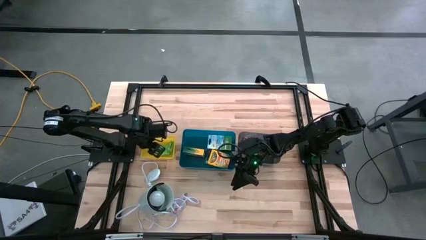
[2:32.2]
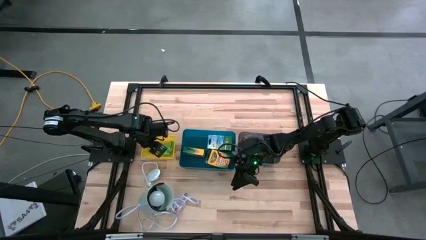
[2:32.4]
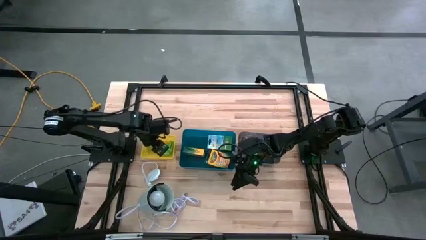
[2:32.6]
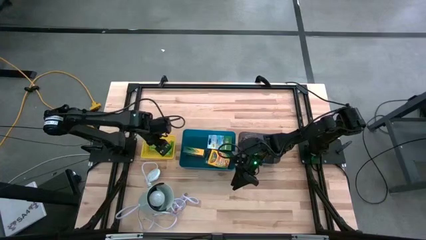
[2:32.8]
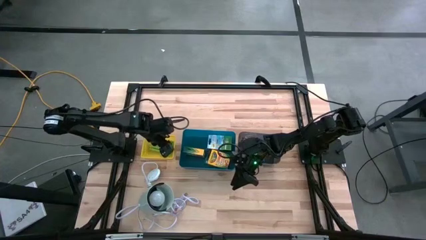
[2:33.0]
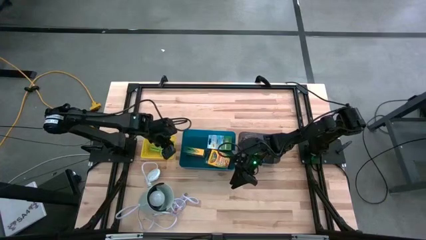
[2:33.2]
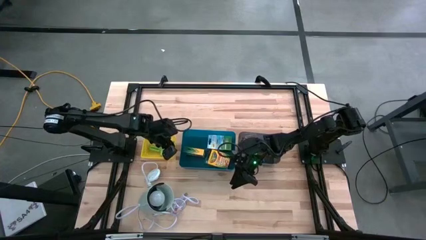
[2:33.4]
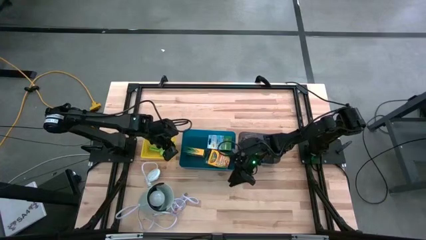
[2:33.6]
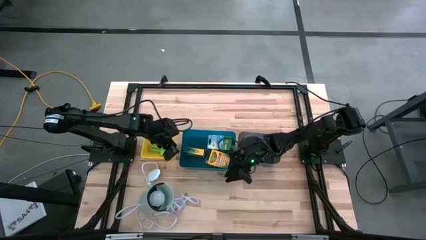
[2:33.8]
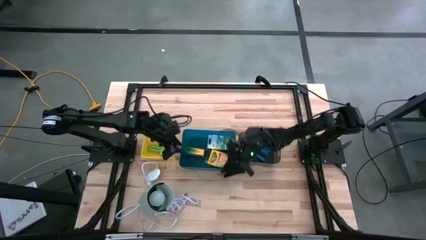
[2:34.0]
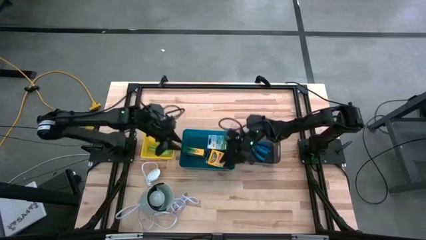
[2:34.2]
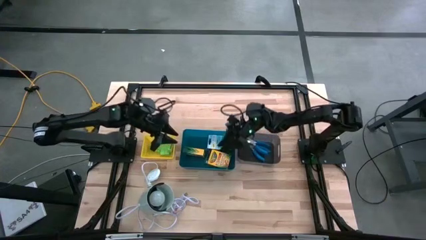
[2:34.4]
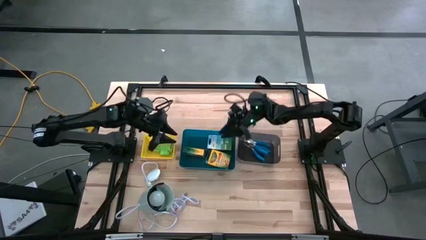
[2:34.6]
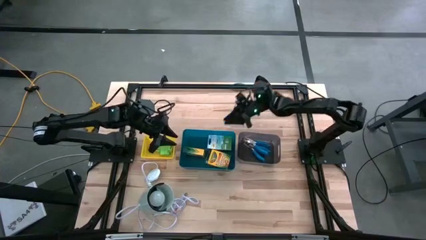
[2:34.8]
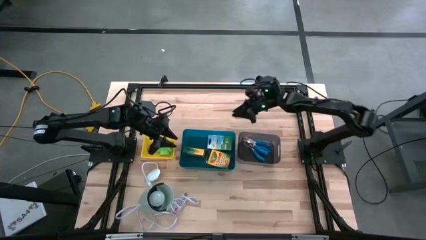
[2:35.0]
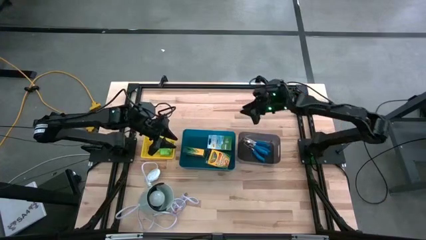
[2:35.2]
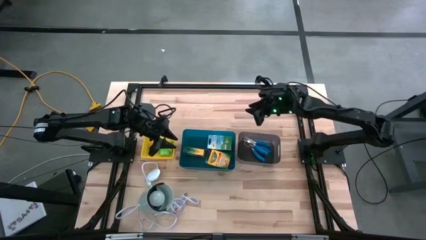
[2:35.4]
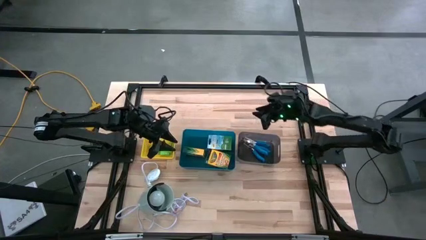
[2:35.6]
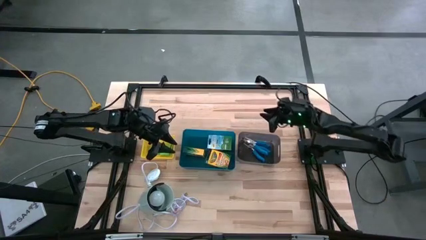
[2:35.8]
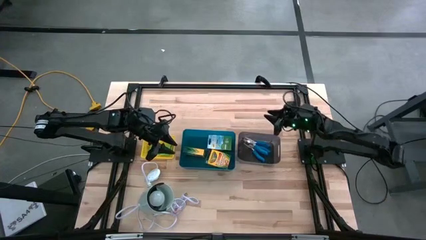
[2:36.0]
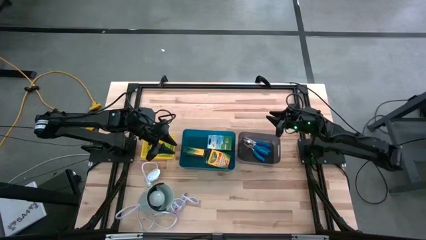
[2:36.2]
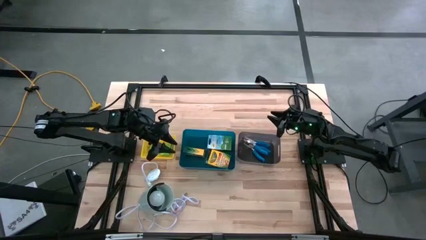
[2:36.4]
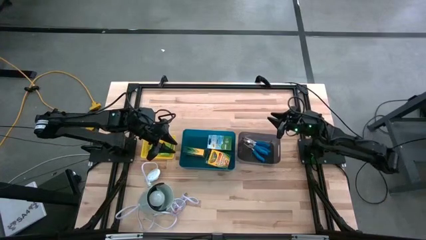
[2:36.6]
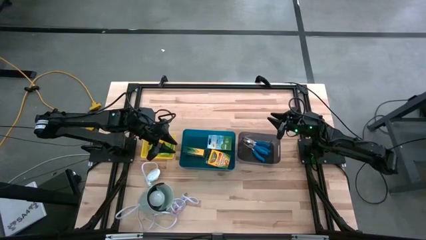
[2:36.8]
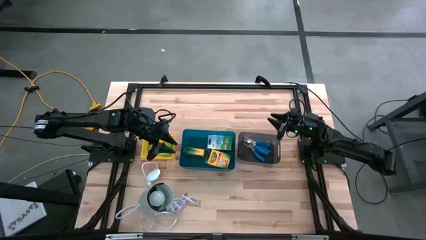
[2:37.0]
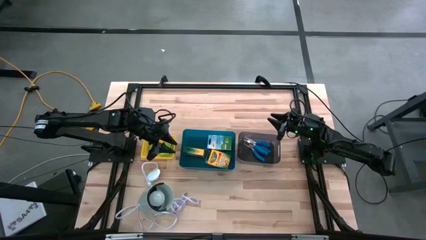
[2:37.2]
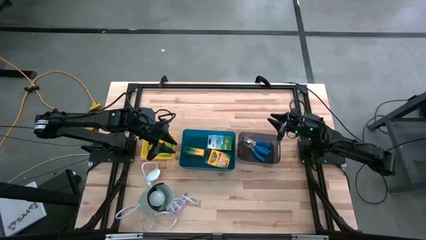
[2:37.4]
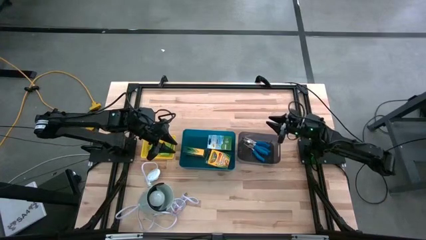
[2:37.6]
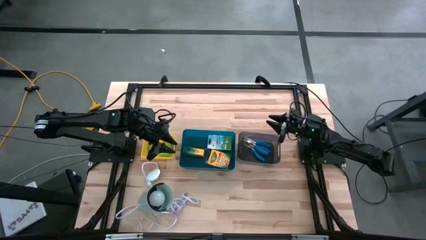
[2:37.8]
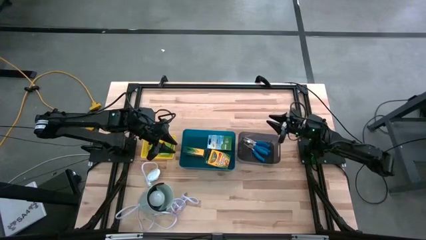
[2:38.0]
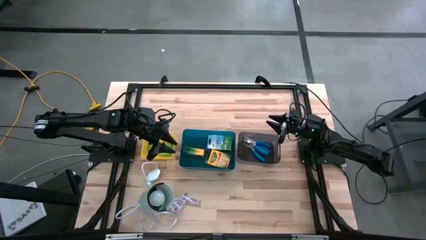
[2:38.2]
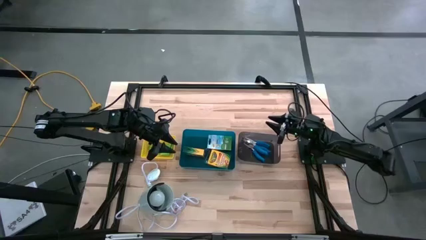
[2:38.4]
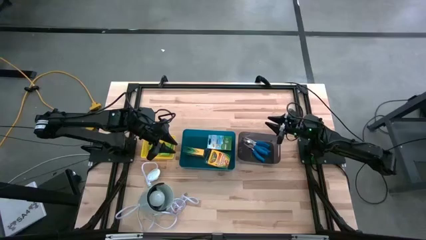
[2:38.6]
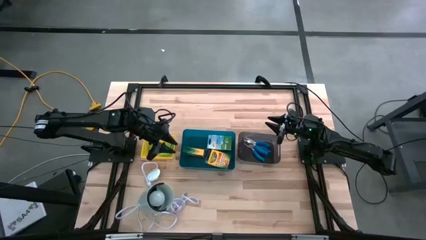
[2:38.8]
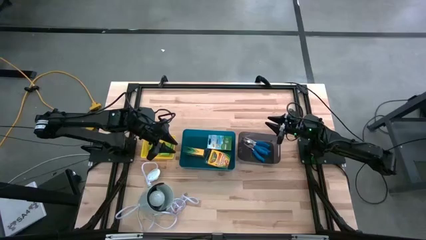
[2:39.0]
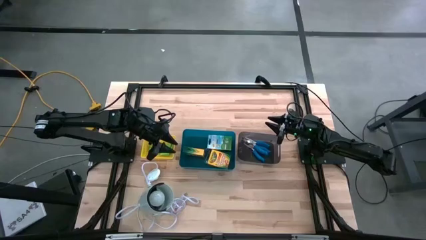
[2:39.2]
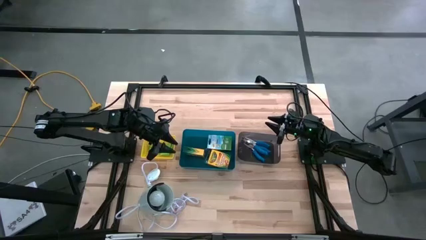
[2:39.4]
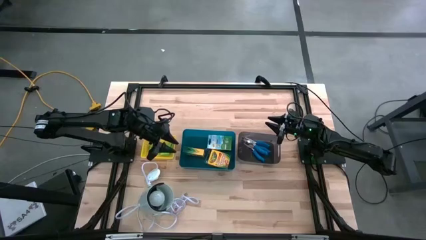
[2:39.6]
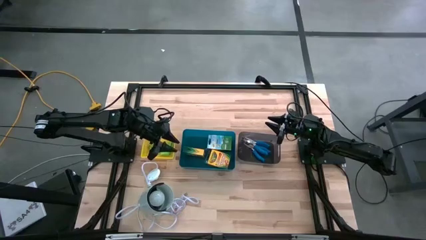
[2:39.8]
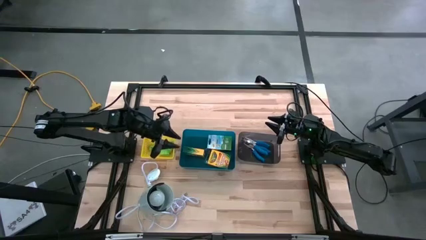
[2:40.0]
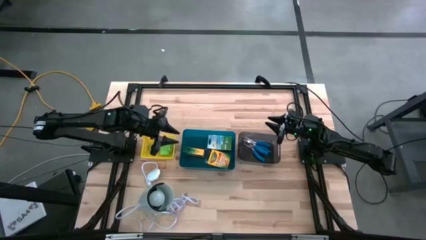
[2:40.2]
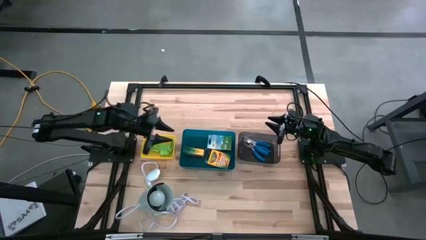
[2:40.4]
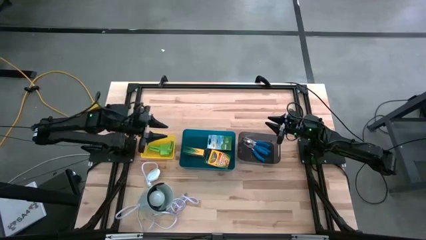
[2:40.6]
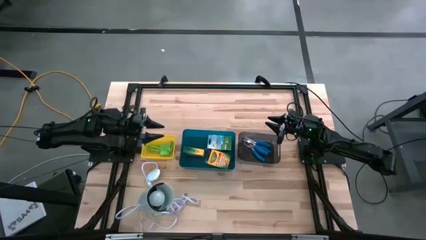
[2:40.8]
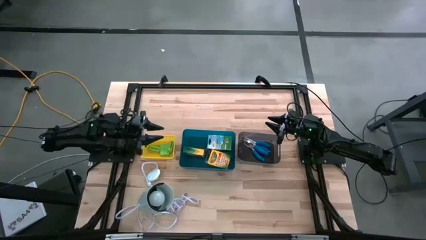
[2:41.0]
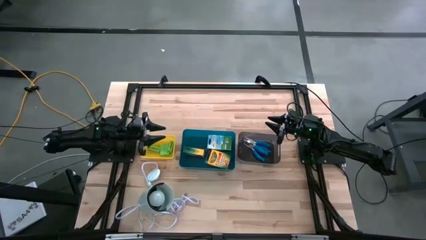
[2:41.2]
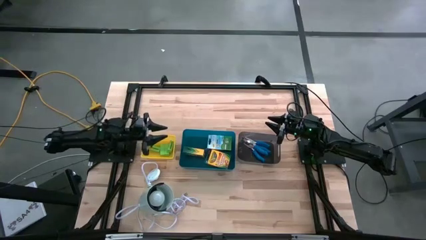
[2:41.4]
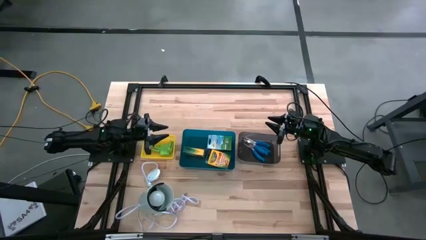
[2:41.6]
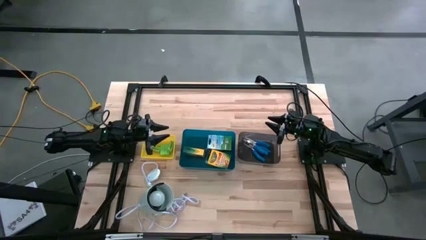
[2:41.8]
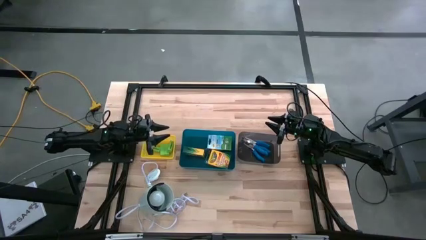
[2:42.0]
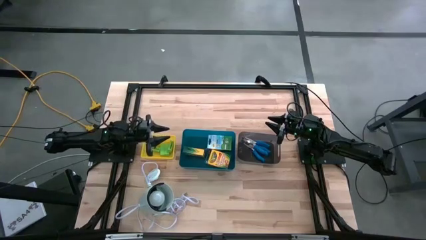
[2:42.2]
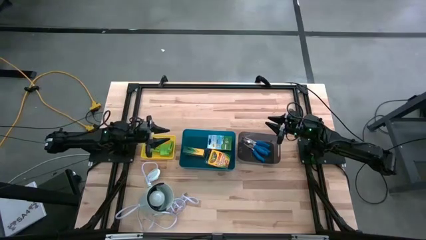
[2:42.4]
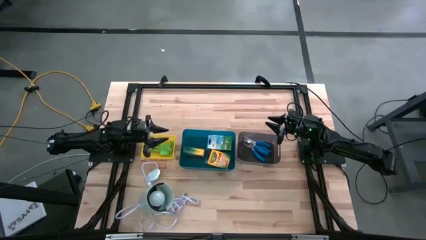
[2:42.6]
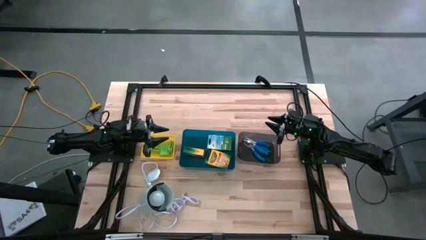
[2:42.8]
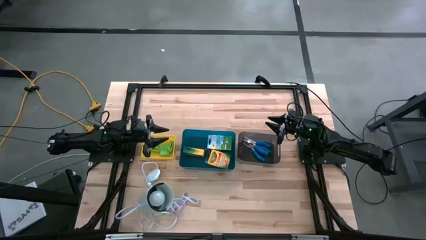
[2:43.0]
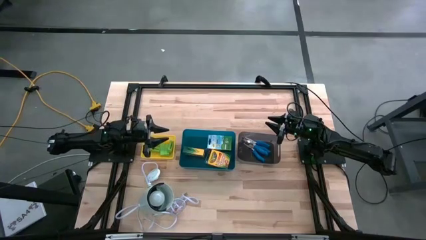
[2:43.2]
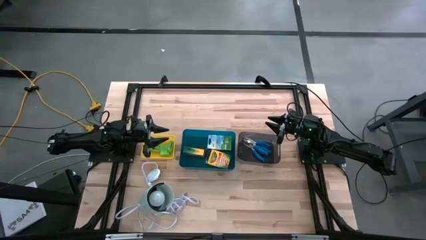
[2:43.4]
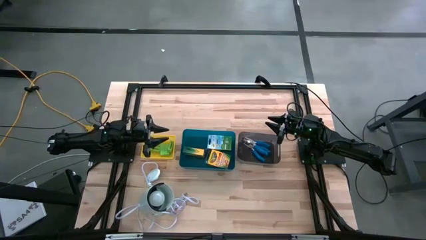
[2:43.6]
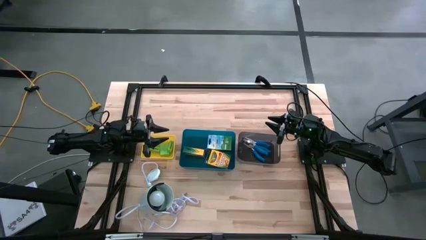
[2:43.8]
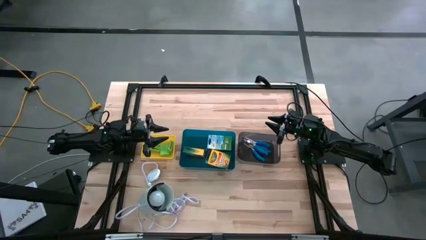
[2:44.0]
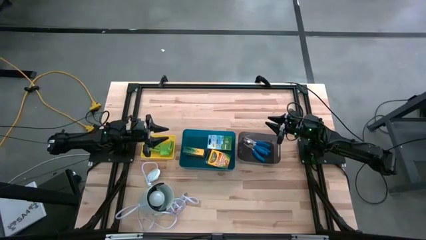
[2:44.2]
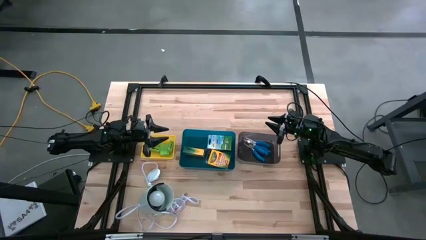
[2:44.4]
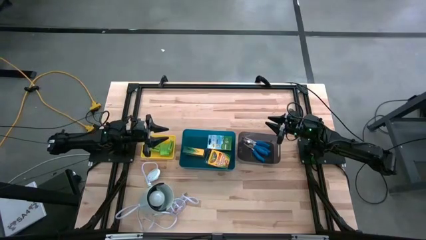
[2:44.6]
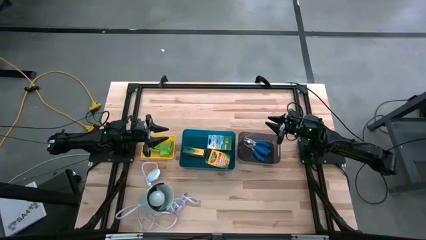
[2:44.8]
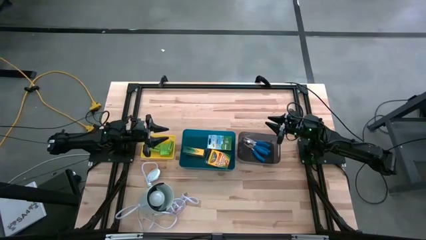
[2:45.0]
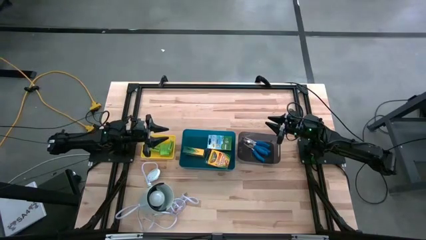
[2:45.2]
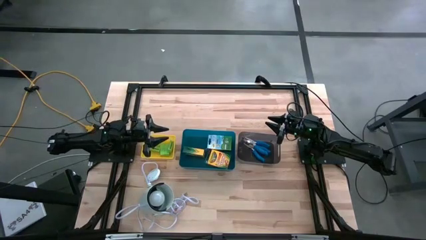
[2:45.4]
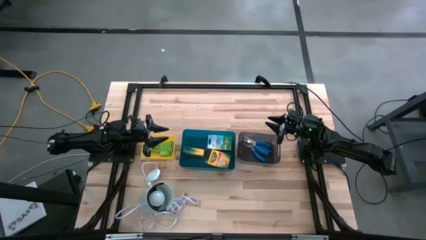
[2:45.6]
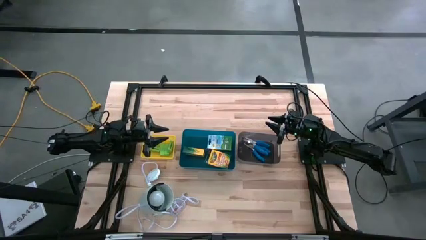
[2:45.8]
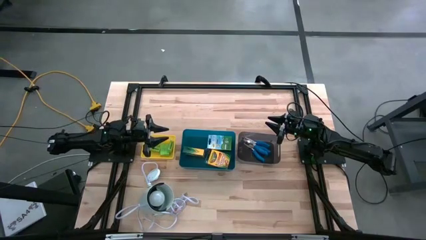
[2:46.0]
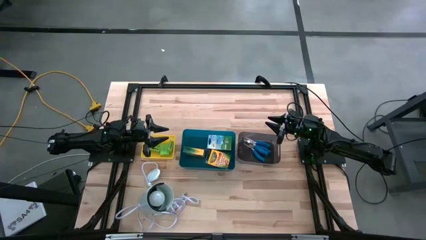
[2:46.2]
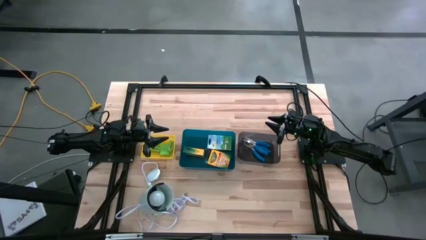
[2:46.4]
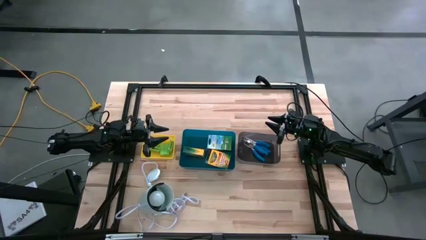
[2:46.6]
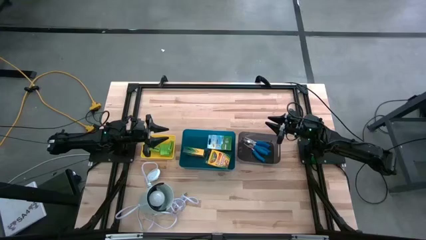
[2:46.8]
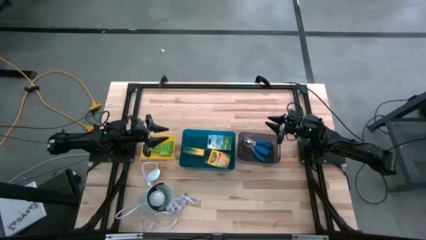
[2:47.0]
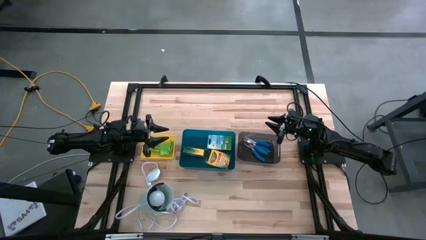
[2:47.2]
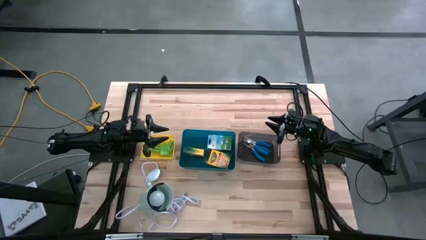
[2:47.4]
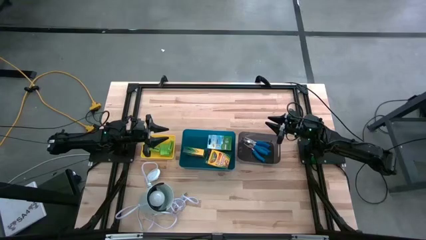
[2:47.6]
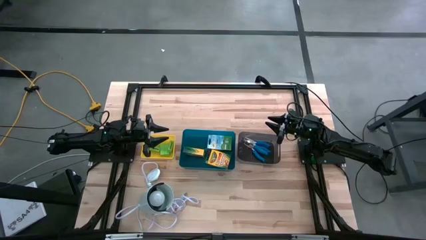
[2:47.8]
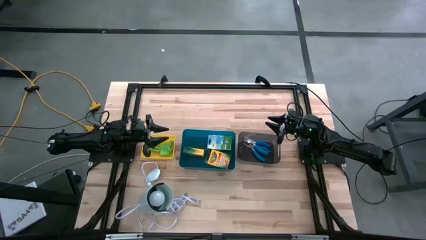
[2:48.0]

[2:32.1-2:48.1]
Task: Pick & Place School Supplies
Return to Home Position
